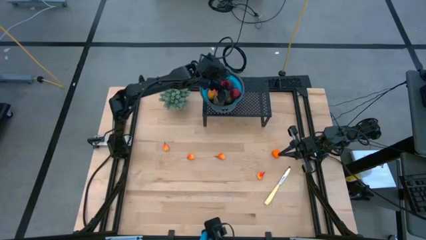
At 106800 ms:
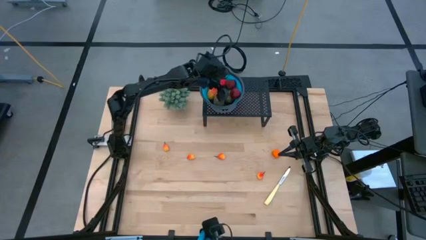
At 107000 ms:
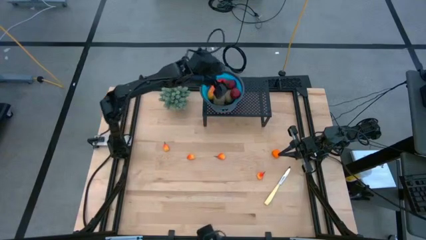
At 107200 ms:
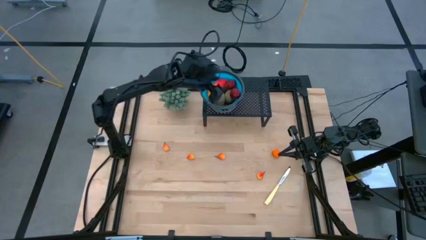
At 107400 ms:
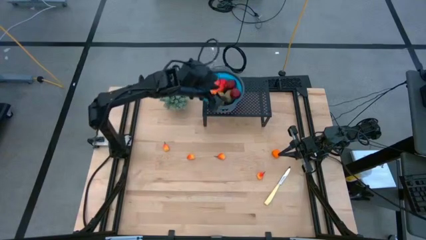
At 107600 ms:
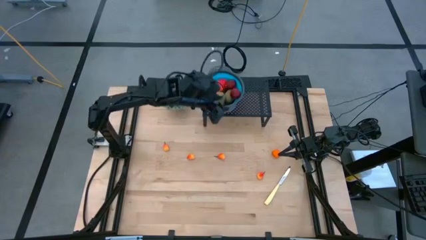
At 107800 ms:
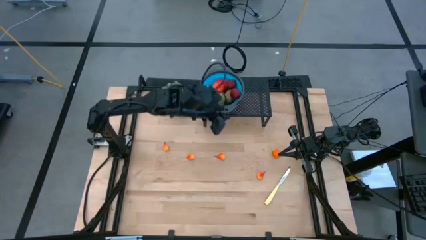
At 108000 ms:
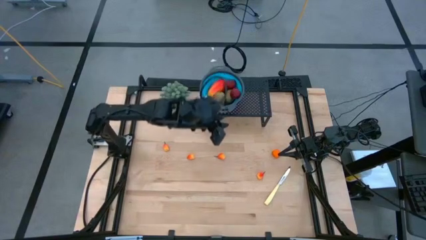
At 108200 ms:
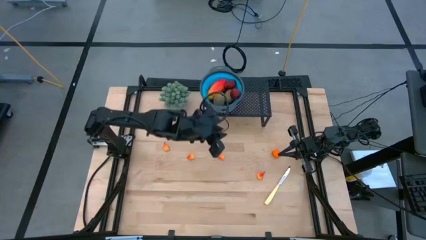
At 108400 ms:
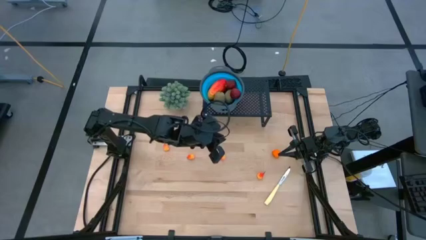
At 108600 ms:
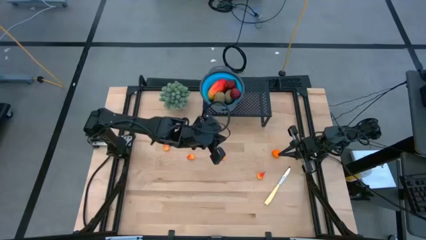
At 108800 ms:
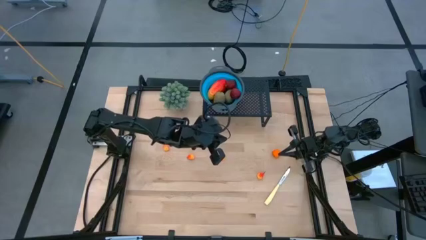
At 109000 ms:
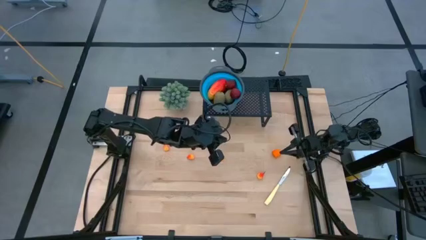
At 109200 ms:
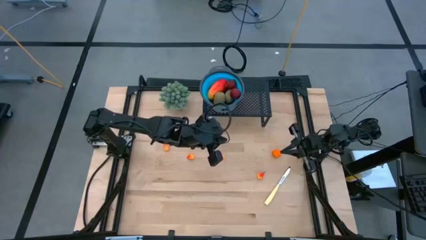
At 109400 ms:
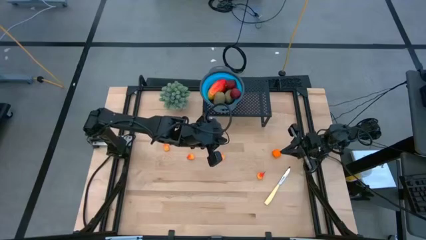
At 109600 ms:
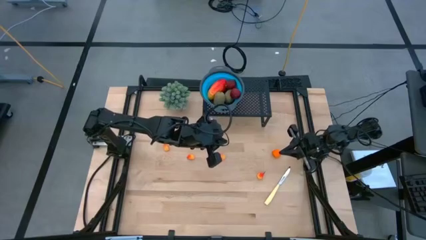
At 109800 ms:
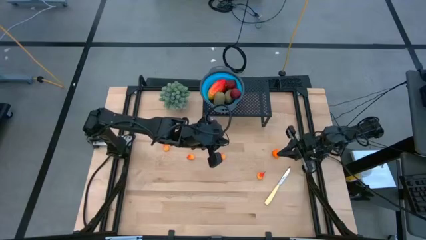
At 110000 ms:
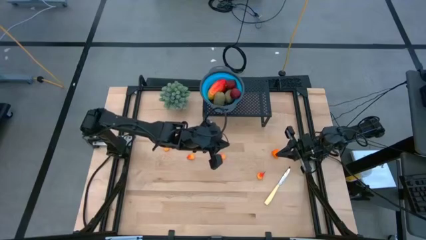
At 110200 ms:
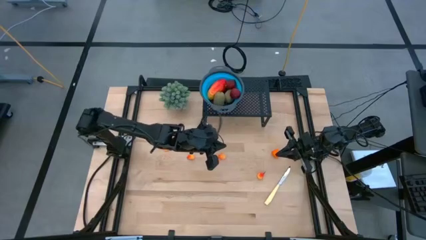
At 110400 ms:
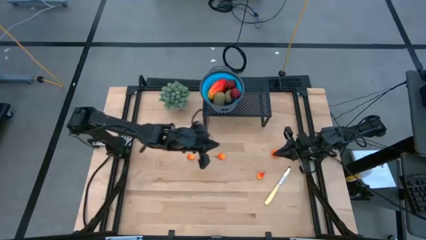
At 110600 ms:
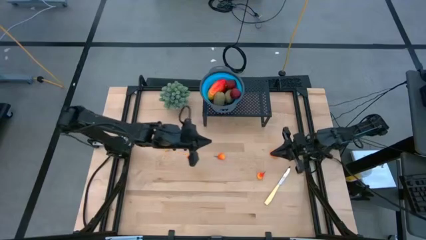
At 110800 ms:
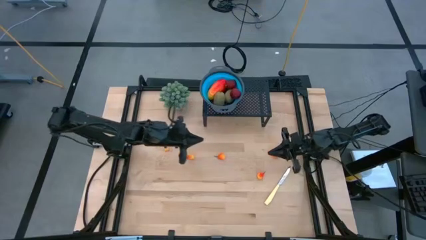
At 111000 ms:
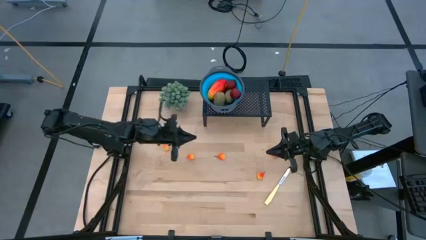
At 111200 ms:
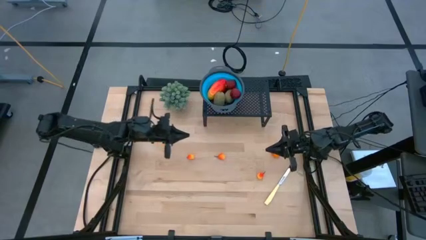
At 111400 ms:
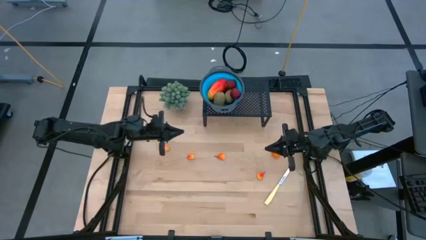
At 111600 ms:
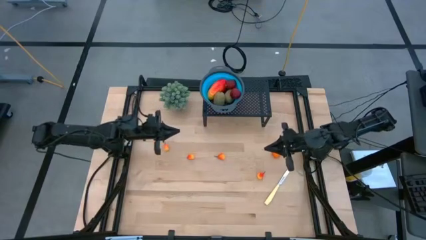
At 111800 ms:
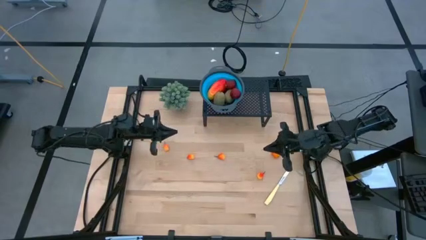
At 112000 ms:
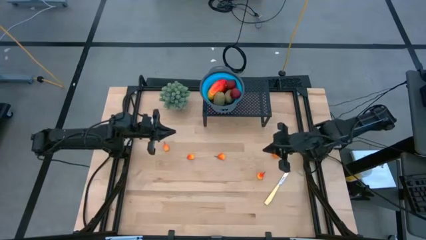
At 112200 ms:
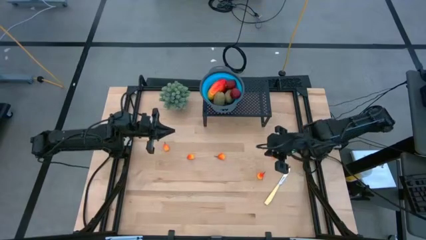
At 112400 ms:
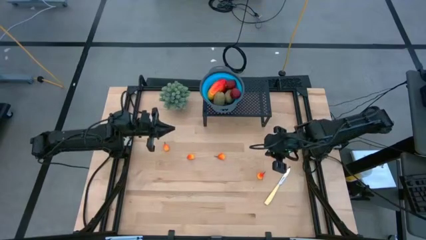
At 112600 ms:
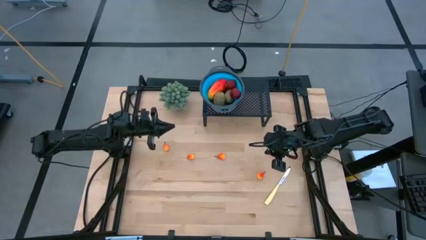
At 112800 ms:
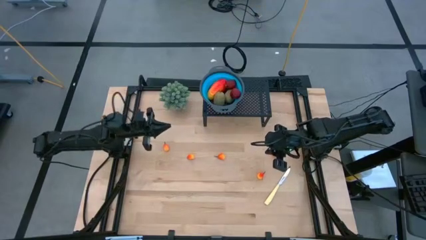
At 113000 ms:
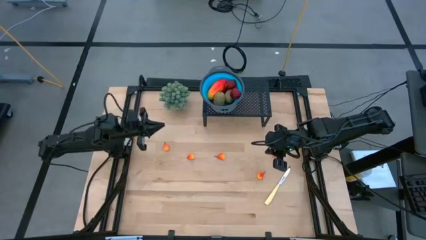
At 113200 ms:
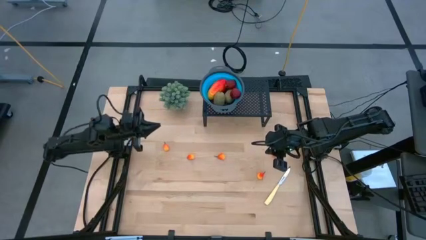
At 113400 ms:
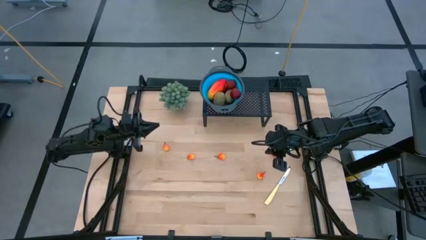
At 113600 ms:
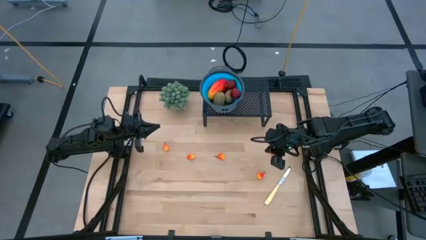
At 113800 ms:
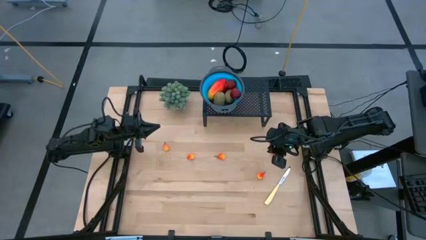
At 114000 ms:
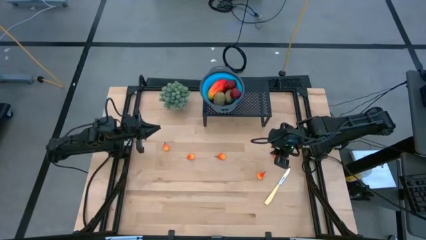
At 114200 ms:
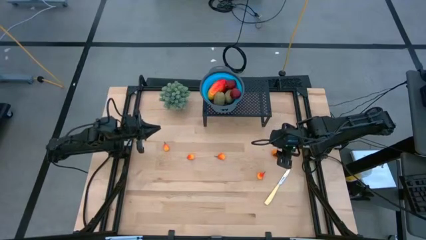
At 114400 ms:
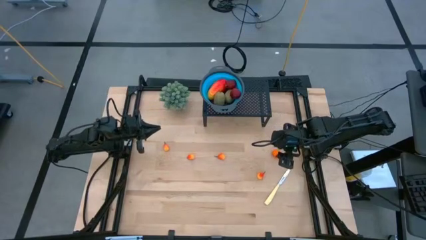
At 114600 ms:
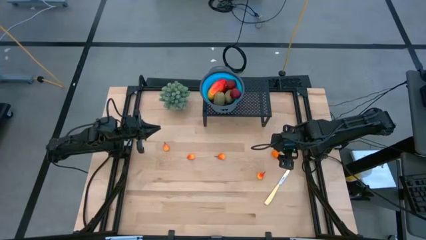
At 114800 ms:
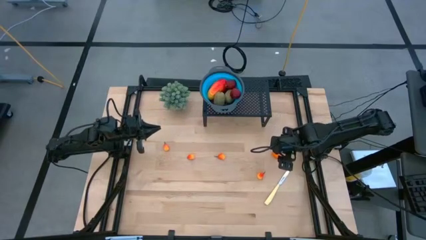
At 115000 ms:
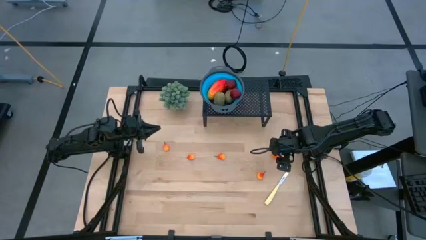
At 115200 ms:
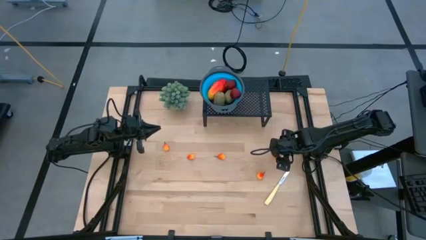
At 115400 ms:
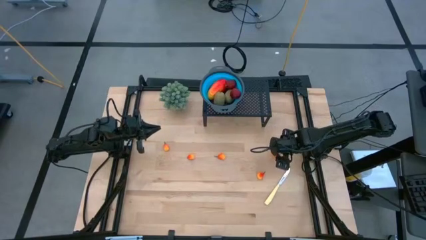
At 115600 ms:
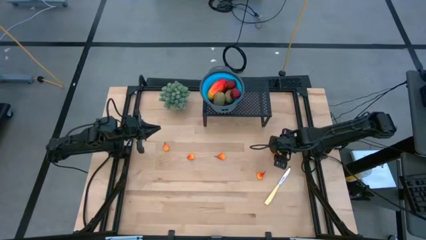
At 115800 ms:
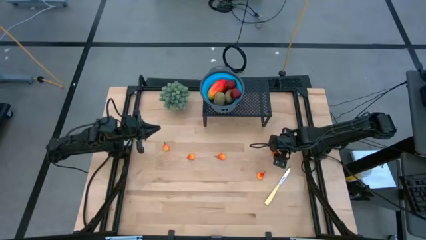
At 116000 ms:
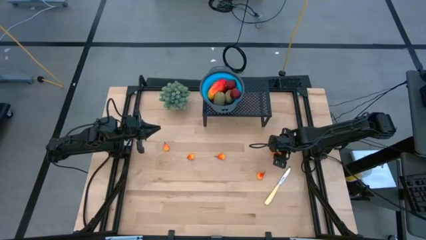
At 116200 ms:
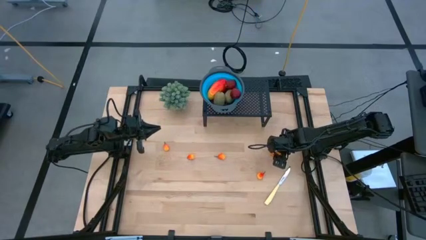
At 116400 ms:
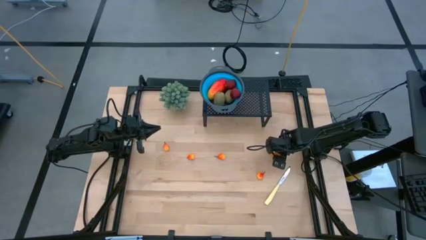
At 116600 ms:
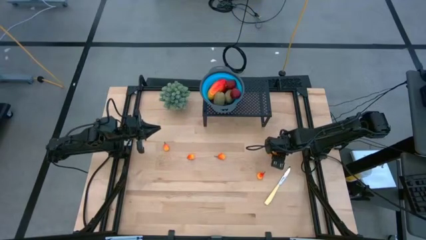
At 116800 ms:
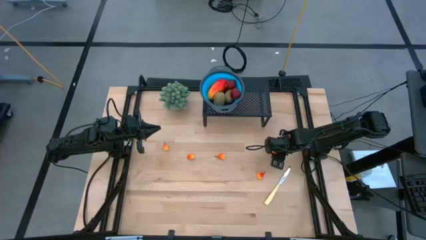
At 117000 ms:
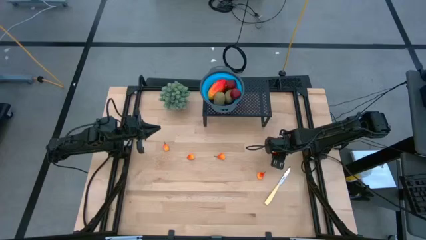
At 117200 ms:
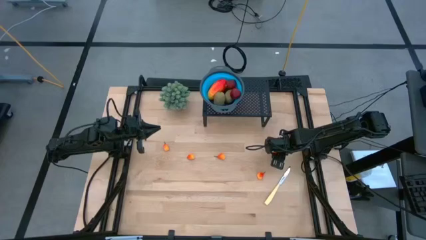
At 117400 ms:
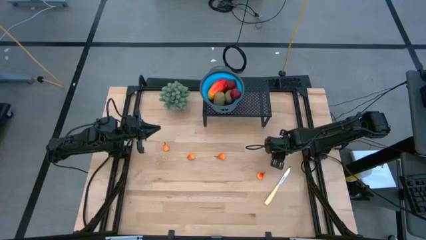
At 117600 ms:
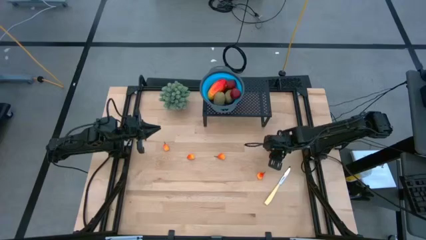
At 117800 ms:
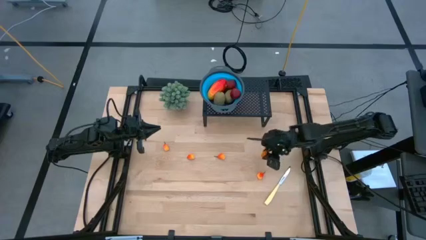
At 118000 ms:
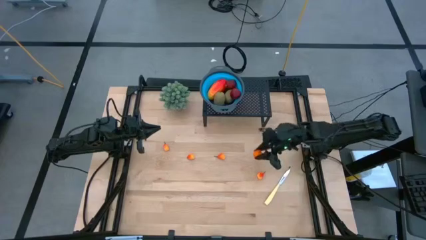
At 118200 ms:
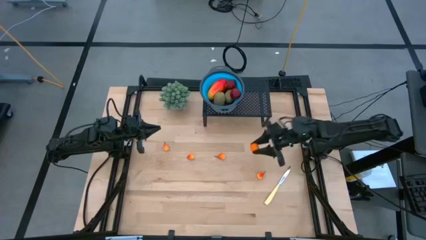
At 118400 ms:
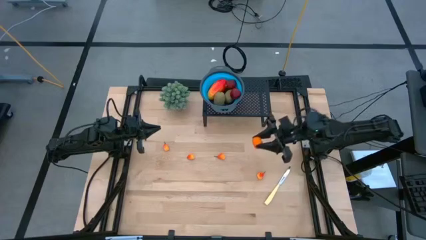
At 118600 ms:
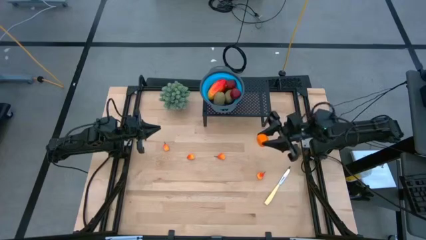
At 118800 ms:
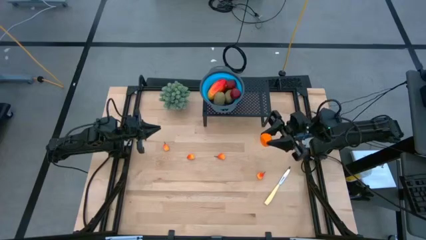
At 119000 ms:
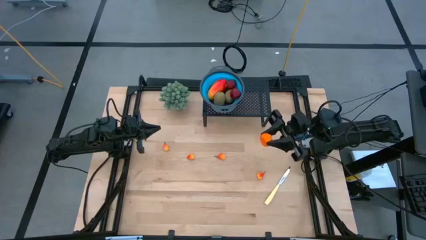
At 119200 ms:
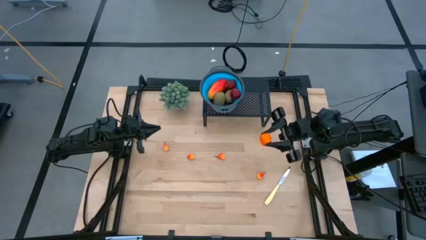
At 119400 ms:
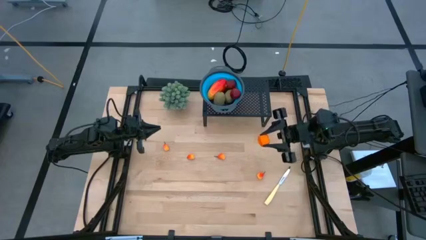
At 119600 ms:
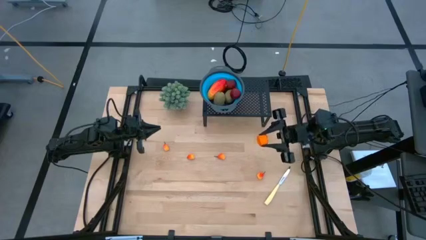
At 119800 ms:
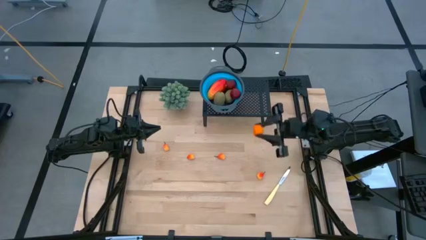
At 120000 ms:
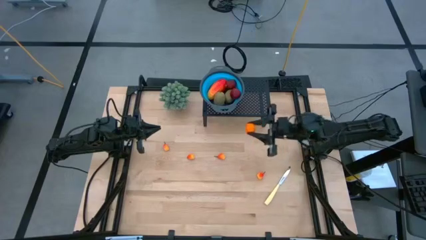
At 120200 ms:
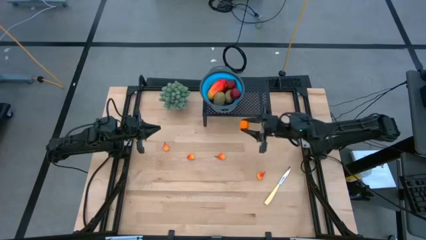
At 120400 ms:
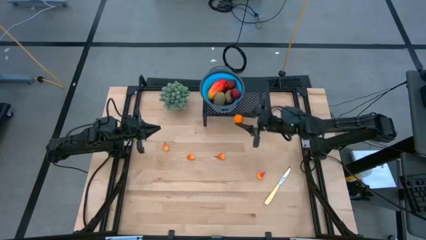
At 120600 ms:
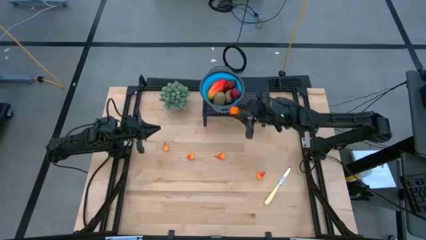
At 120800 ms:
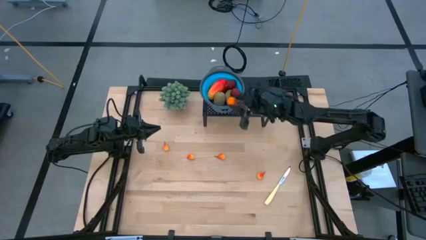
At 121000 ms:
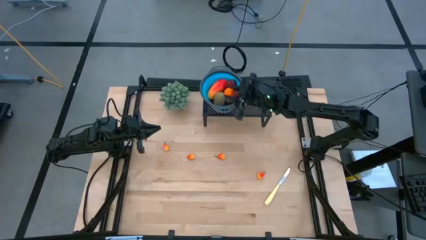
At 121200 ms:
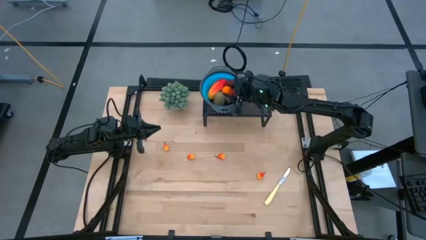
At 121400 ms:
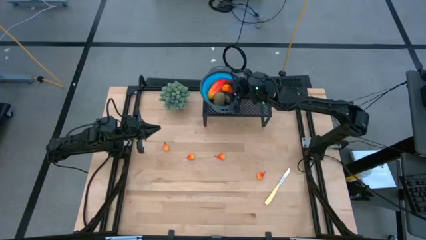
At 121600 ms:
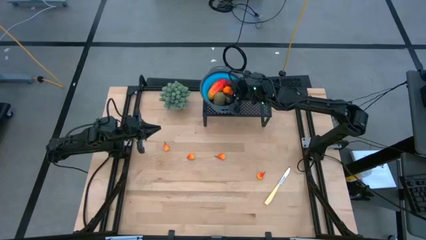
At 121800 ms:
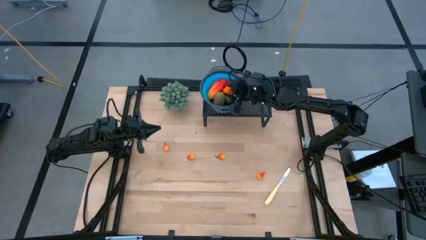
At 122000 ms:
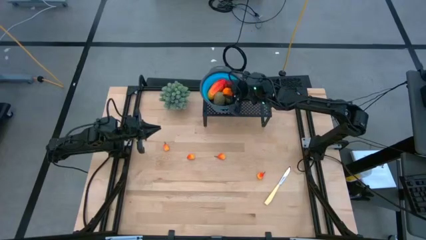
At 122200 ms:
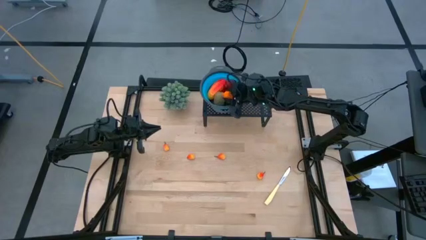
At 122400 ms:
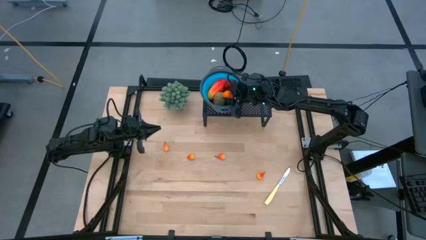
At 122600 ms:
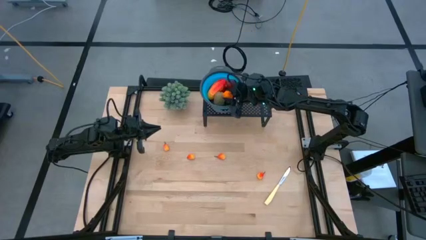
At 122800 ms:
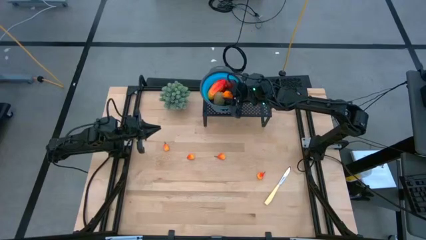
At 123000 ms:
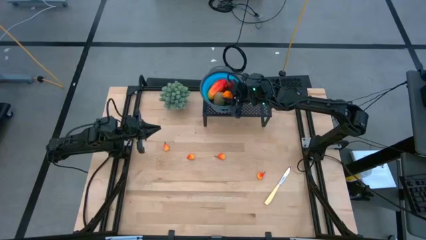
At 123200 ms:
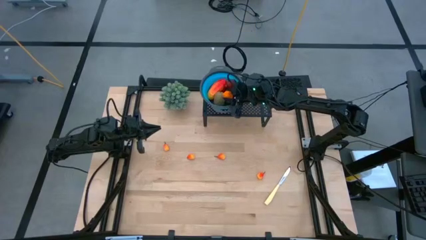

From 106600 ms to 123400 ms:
Task: Pick & Place Fruit
Put the orange into the blue strainer bowl on the shelf
